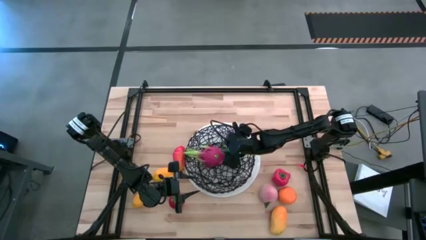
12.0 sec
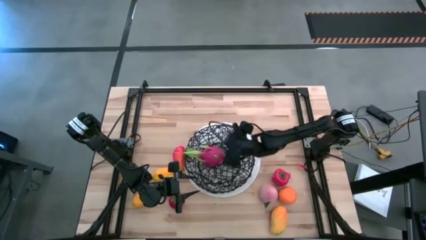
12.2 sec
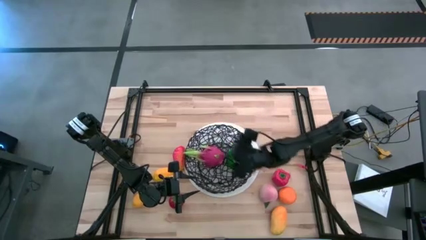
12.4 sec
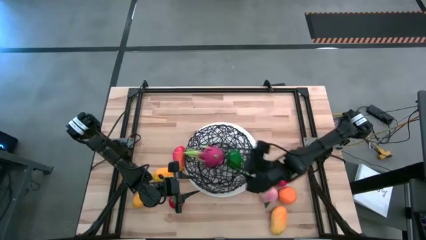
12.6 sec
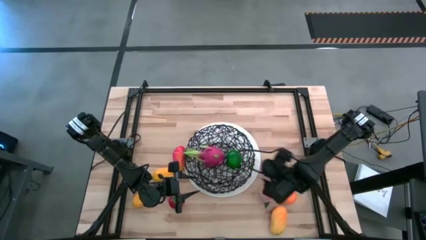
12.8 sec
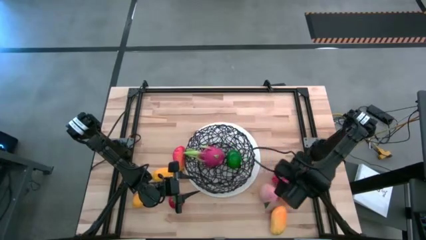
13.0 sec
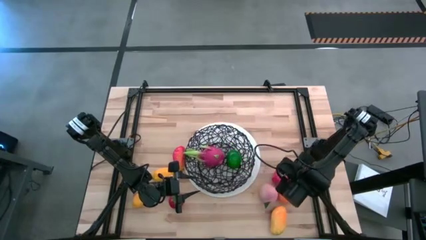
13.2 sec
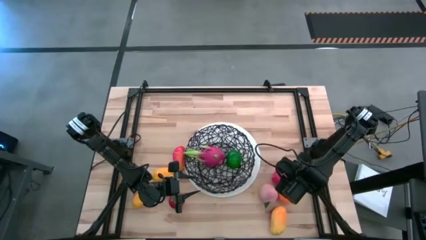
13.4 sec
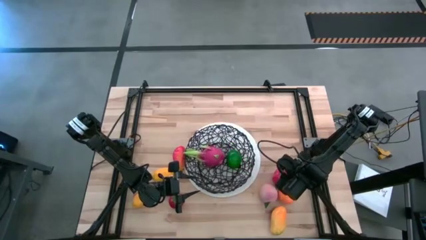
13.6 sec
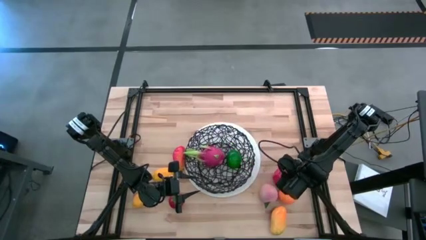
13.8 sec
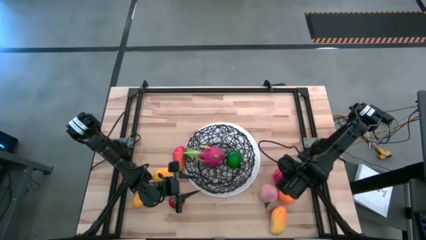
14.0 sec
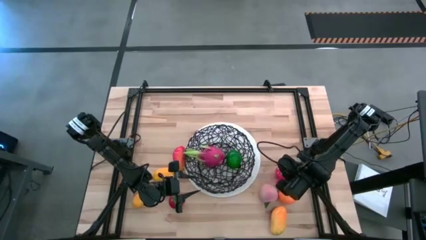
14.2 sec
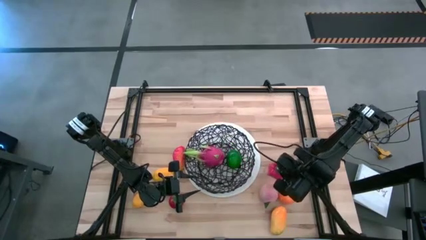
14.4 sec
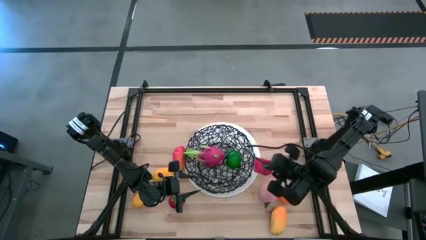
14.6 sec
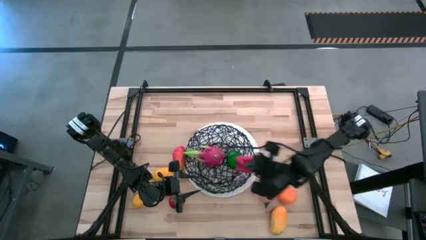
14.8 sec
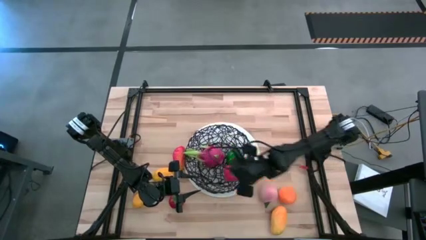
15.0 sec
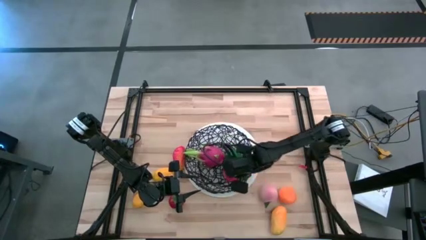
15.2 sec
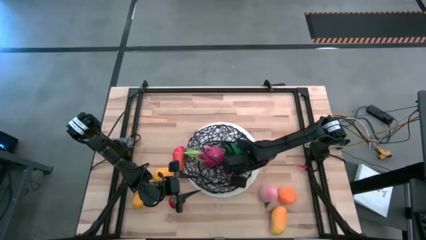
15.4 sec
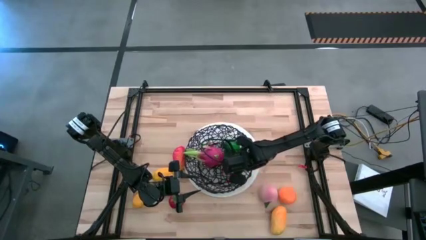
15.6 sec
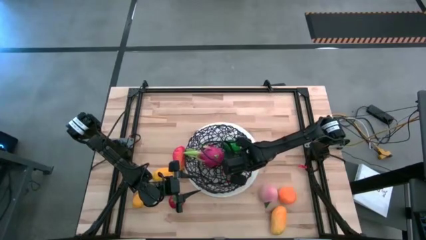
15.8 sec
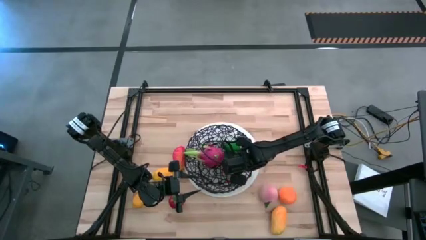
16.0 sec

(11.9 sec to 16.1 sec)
Task: Build produce basket
Put the bell pepper into the basket

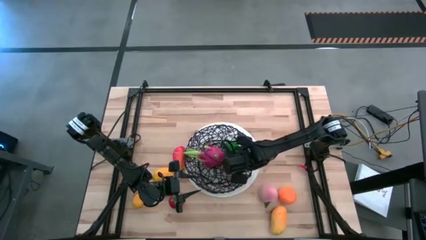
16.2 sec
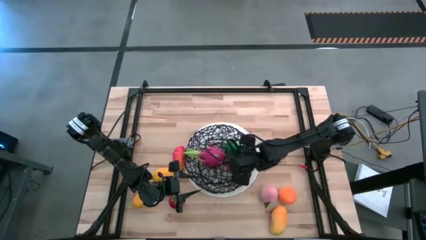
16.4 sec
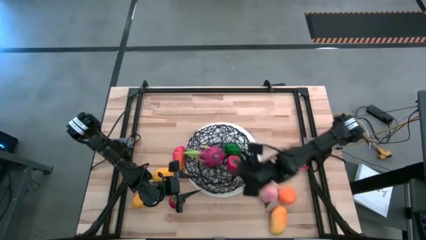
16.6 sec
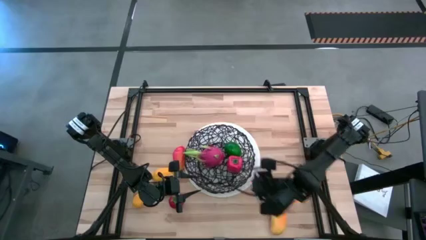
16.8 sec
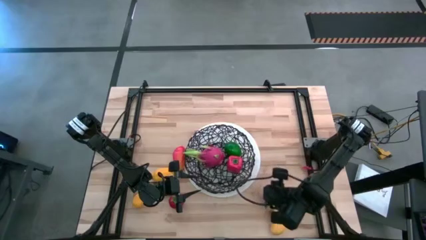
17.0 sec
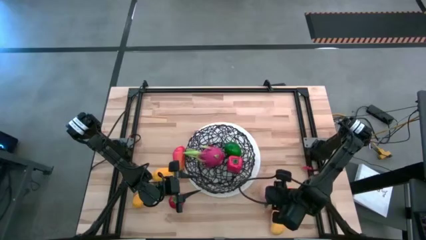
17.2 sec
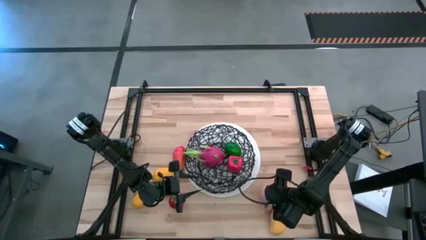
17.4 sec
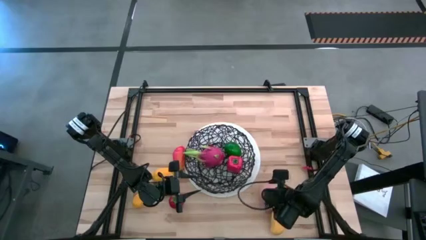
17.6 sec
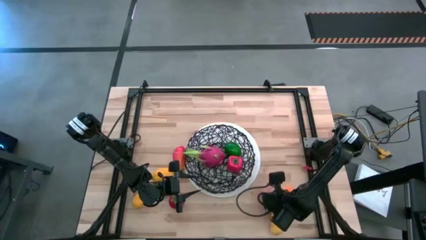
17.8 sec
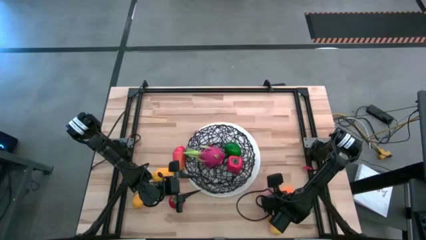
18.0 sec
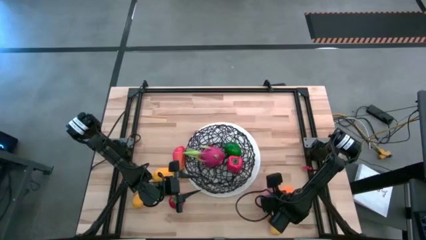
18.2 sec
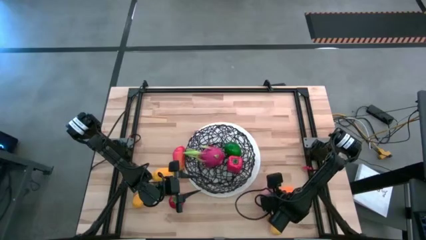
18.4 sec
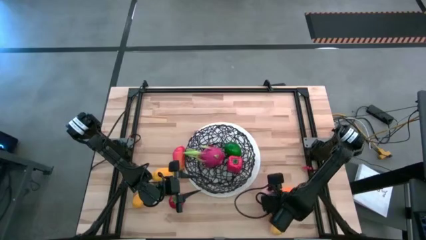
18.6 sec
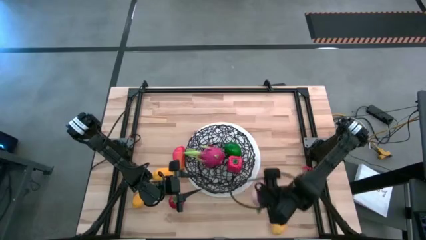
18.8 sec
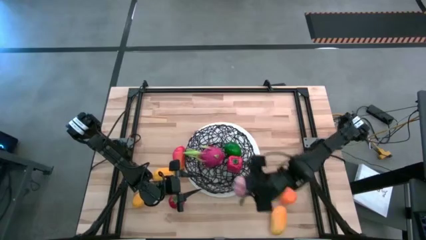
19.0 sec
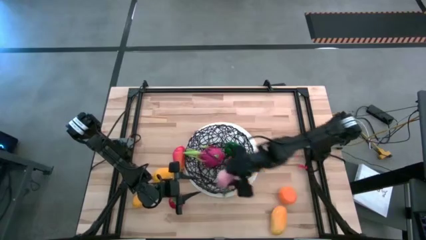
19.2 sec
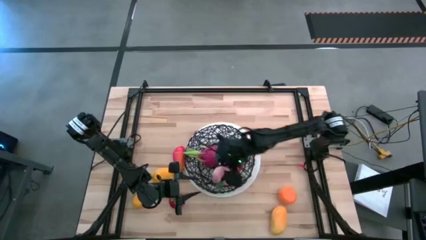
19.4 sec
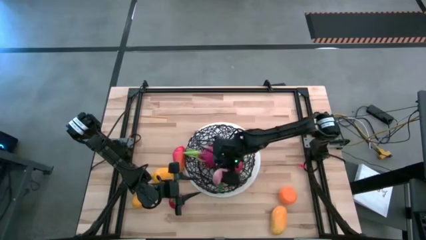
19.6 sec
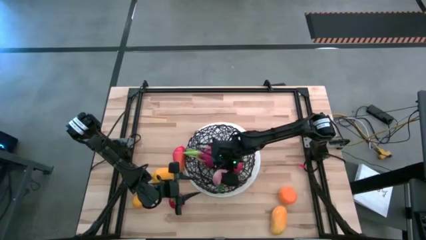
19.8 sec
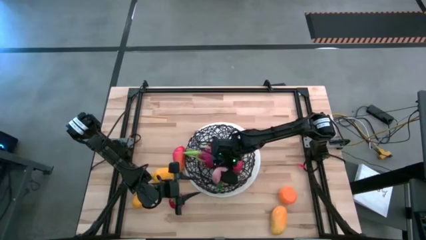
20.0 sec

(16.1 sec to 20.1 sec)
Put the peach into the basket

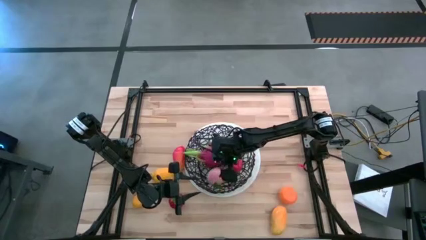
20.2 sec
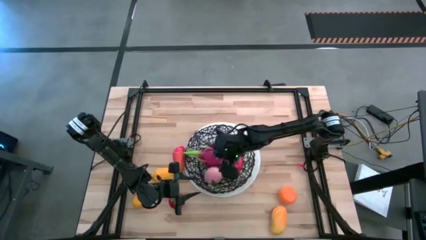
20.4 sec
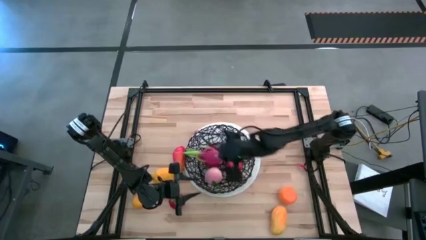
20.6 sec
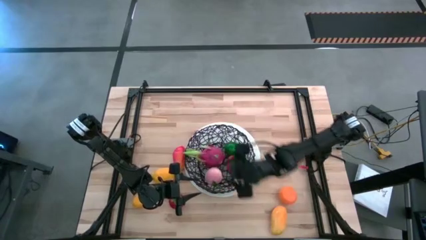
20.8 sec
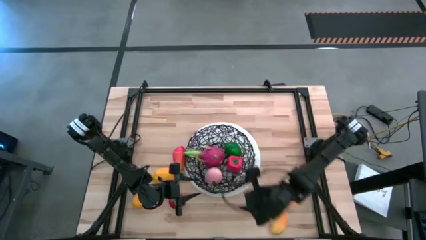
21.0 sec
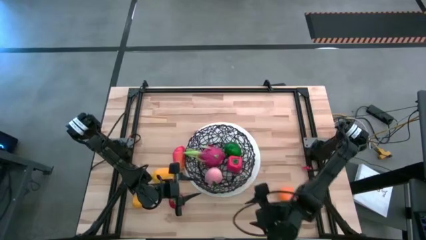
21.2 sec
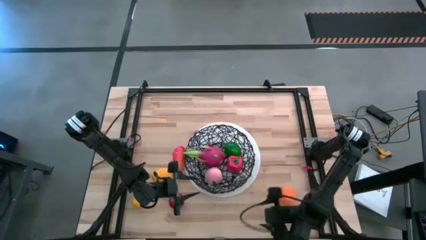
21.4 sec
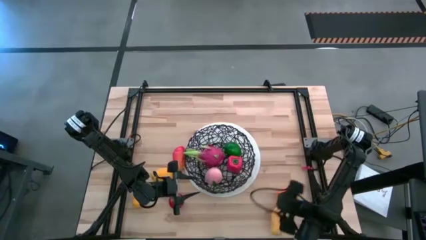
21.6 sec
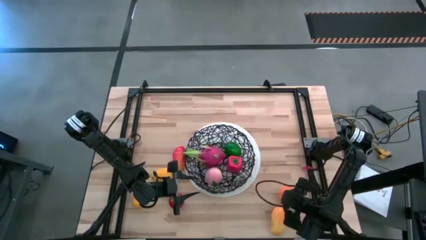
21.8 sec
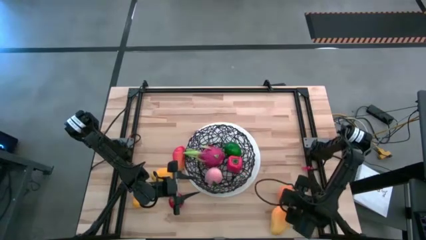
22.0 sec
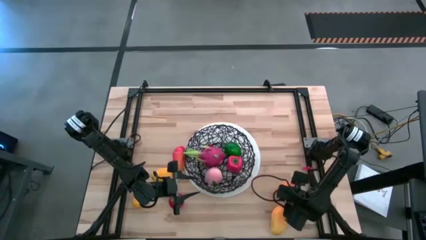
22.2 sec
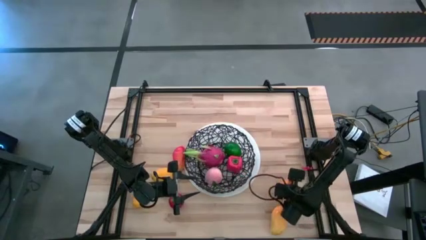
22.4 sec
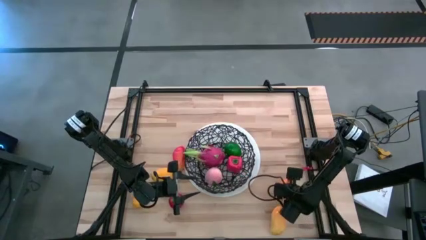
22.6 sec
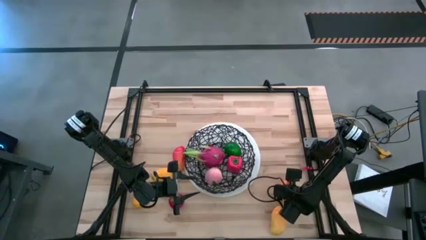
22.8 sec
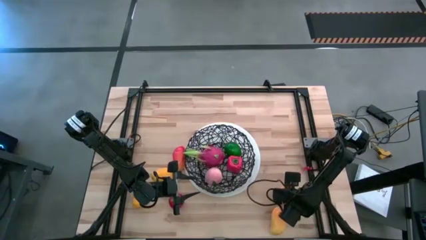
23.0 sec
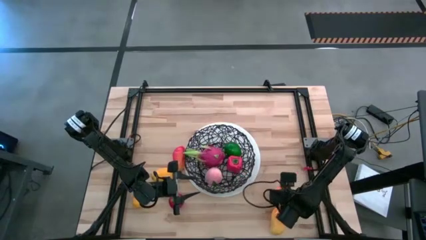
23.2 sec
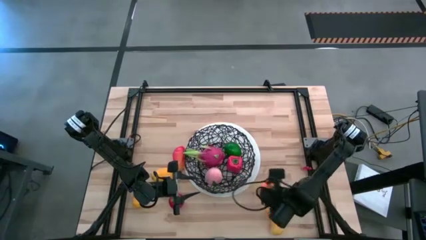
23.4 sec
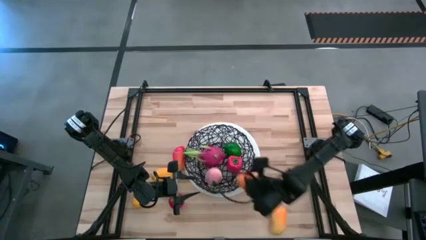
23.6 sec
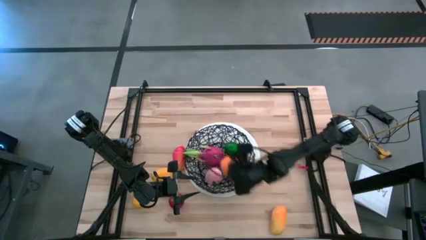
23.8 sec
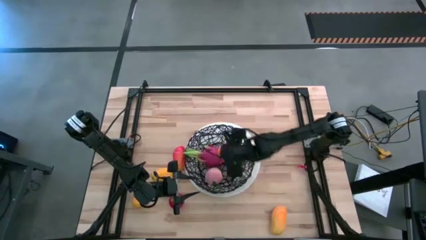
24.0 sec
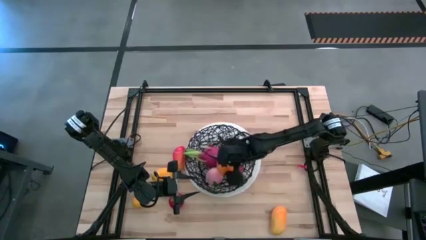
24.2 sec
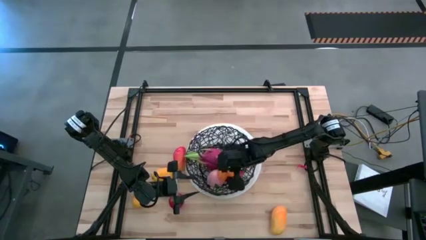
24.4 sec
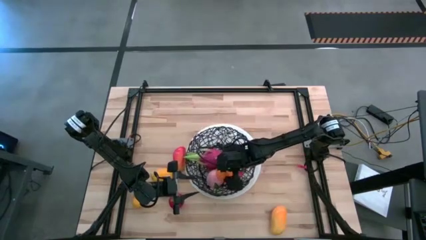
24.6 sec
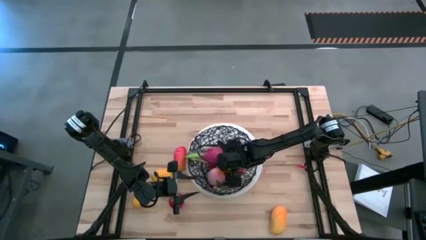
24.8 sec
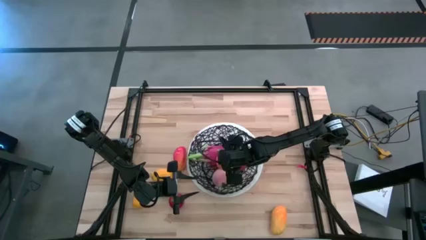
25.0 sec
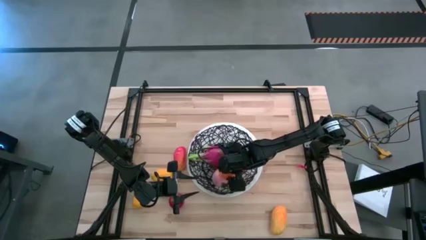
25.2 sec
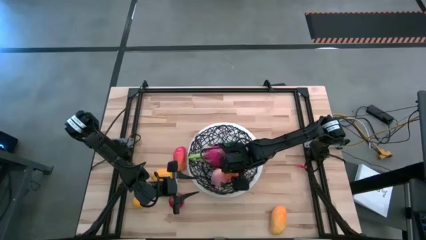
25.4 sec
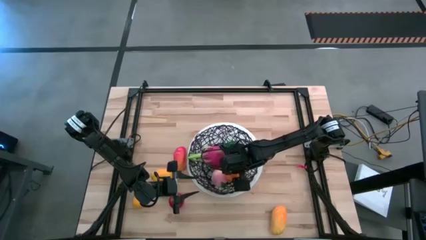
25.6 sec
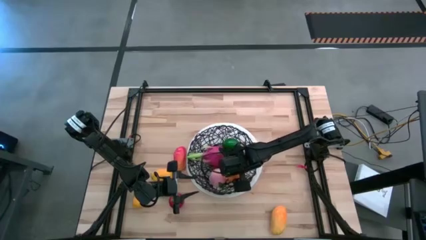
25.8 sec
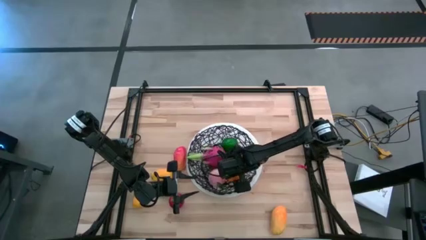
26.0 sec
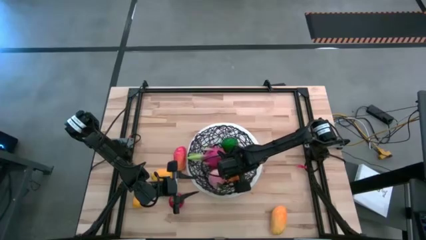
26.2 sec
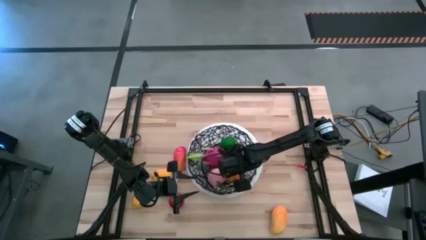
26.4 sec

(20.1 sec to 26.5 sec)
Put the orange into the basket

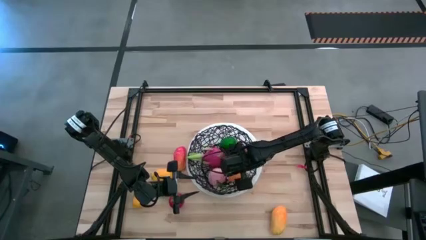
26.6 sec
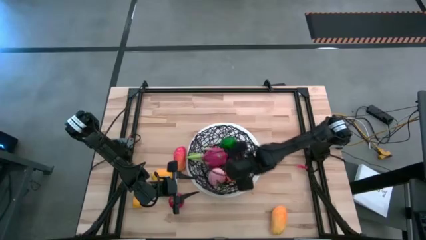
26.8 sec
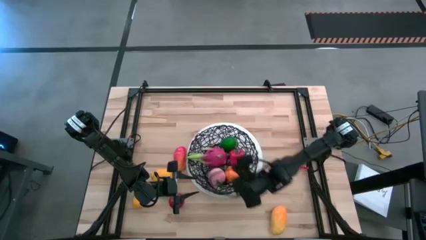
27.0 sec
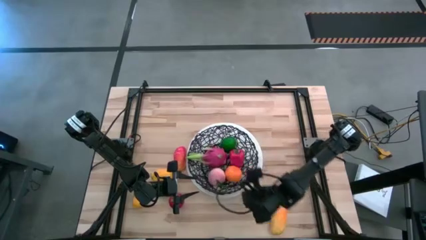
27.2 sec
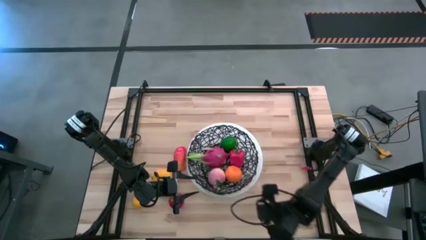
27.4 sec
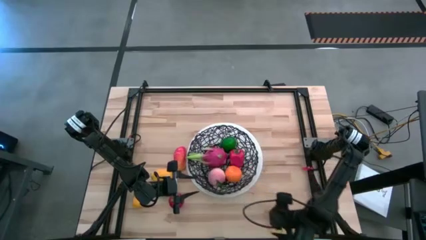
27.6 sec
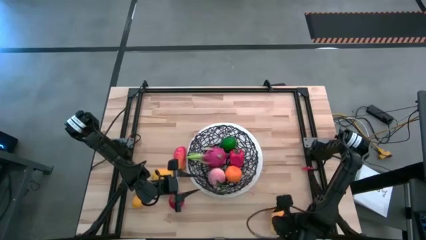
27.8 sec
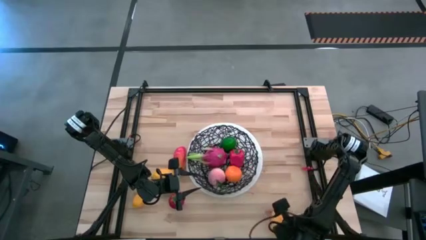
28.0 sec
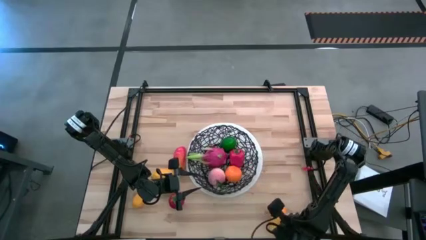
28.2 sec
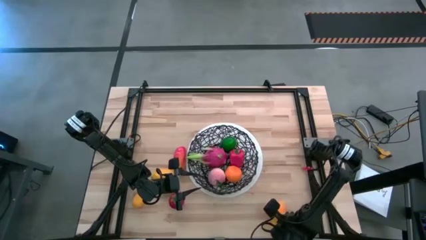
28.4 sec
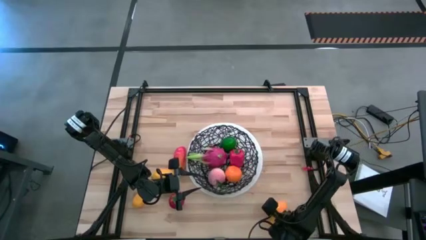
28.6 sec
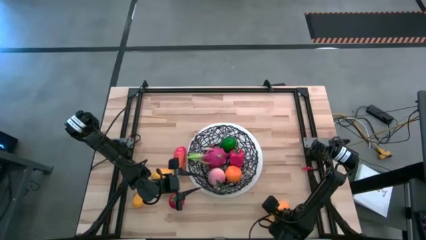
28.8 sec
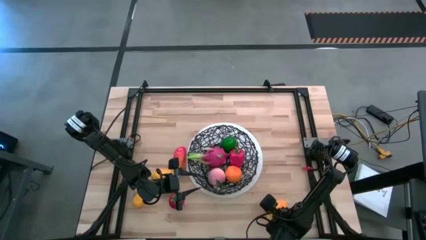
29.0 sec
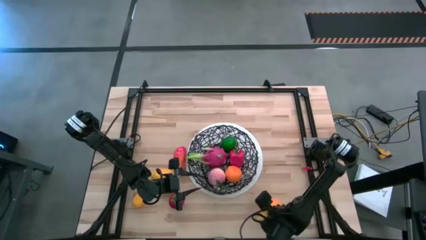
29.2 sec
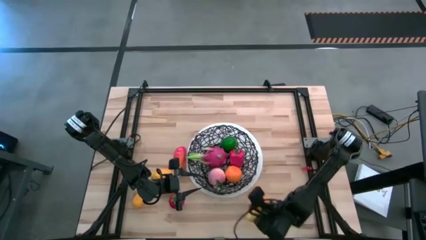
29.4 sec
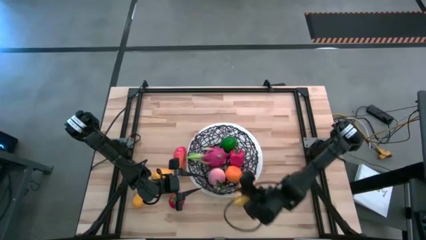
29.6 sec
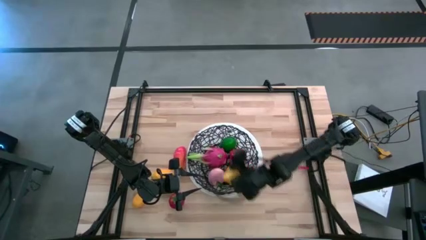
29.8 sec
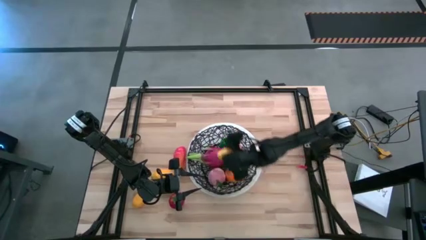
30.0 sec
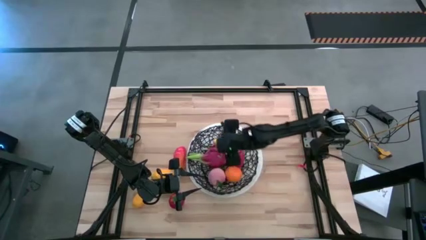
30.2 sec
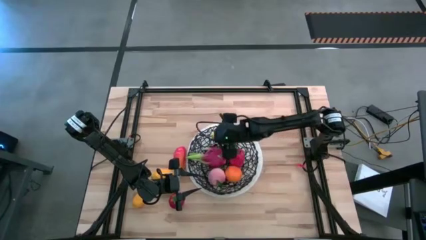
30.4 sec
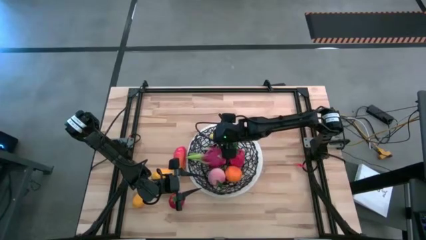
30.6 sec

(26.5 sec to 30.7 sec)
Put the yellow mango into the basket
